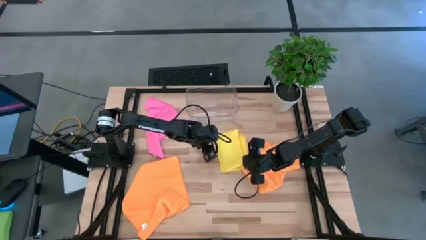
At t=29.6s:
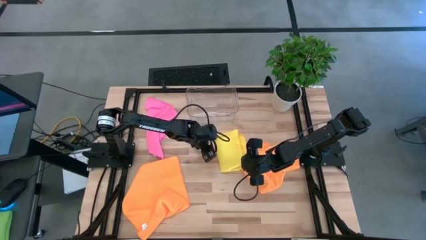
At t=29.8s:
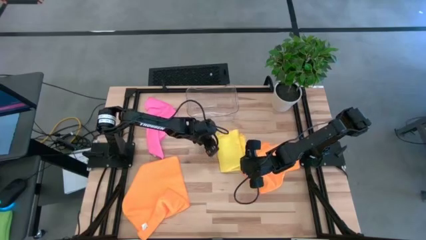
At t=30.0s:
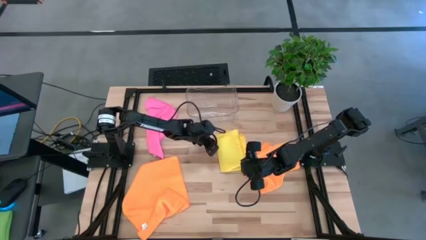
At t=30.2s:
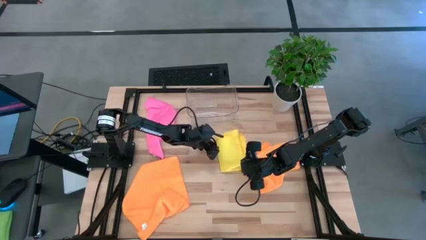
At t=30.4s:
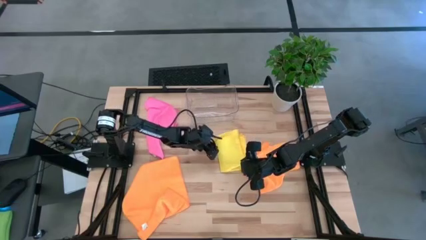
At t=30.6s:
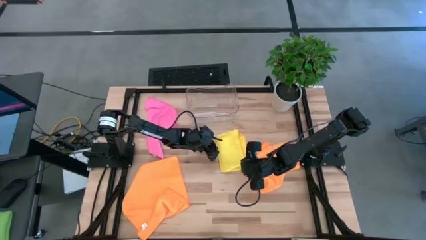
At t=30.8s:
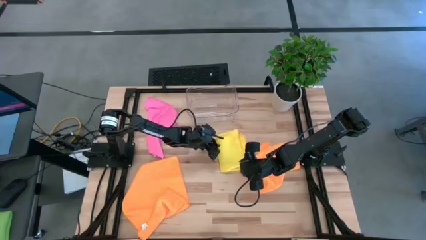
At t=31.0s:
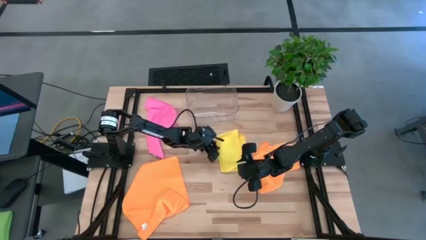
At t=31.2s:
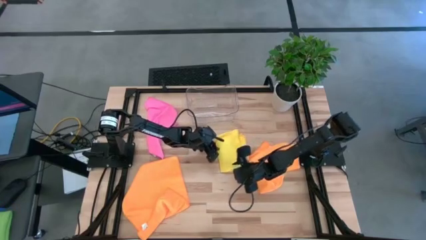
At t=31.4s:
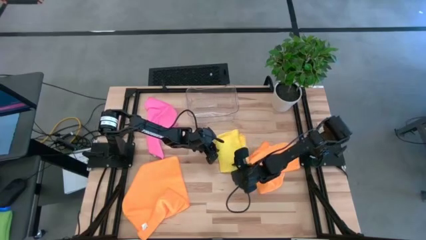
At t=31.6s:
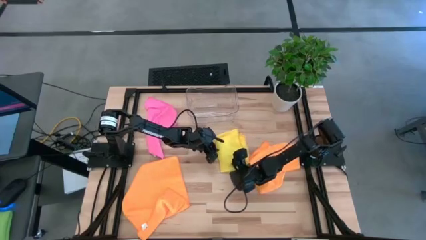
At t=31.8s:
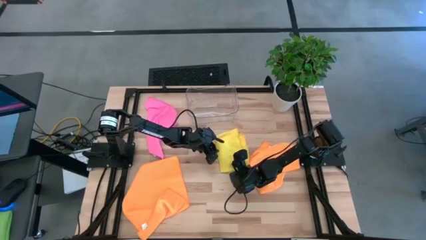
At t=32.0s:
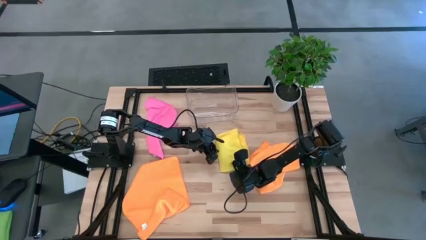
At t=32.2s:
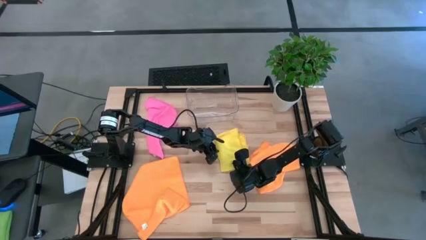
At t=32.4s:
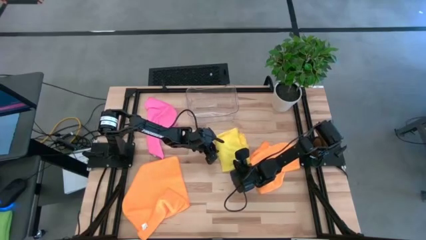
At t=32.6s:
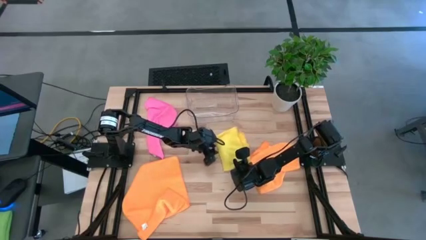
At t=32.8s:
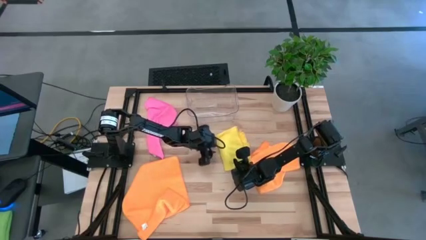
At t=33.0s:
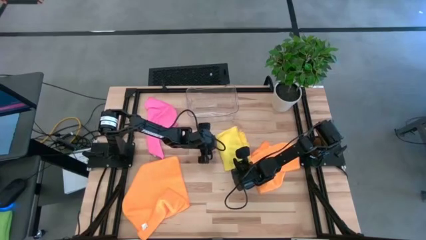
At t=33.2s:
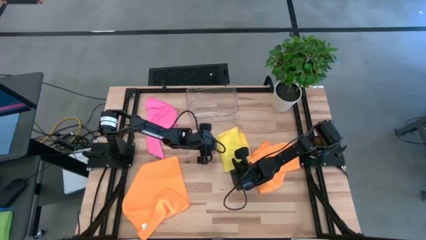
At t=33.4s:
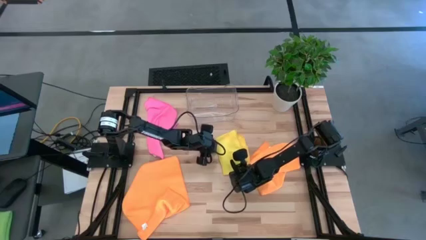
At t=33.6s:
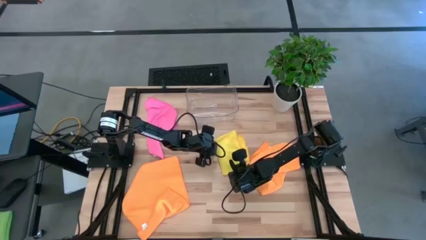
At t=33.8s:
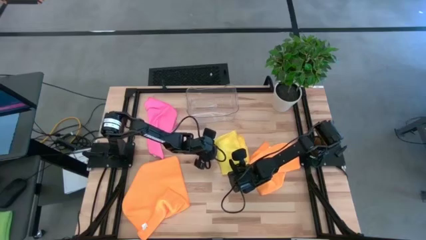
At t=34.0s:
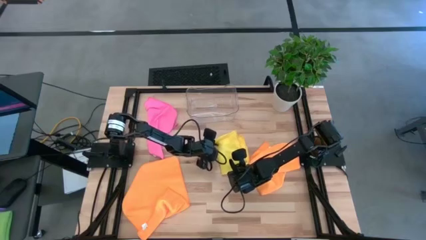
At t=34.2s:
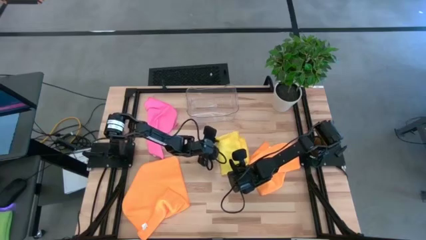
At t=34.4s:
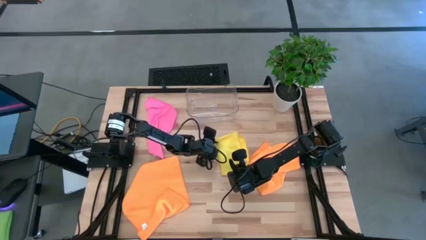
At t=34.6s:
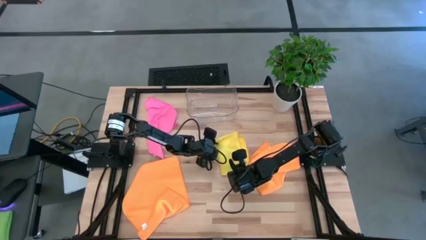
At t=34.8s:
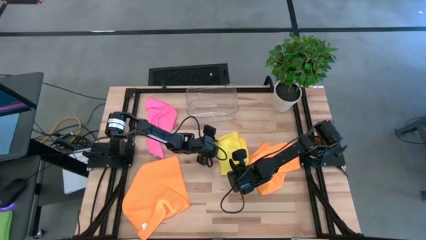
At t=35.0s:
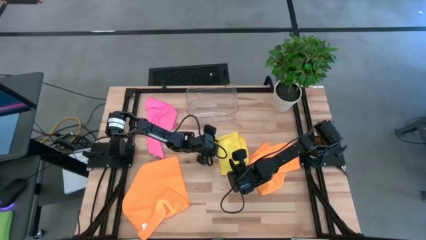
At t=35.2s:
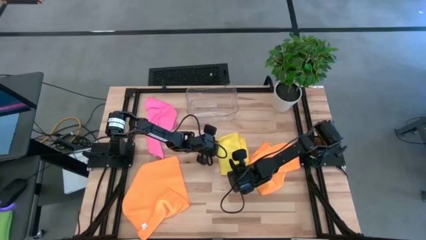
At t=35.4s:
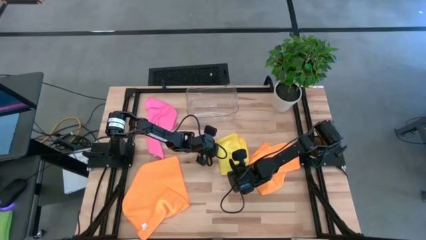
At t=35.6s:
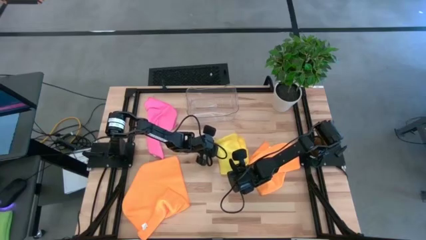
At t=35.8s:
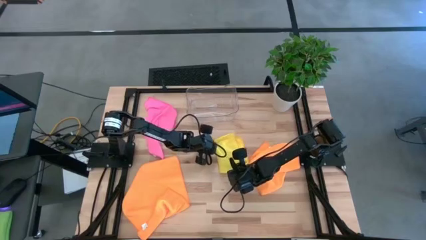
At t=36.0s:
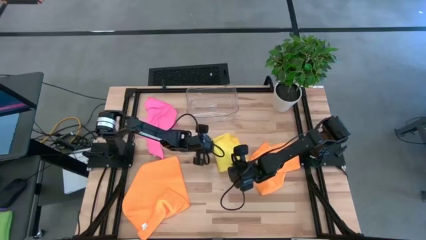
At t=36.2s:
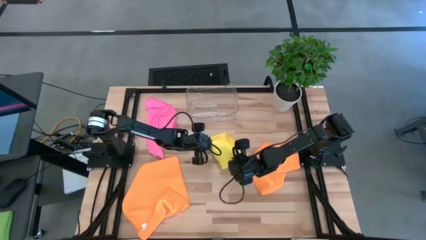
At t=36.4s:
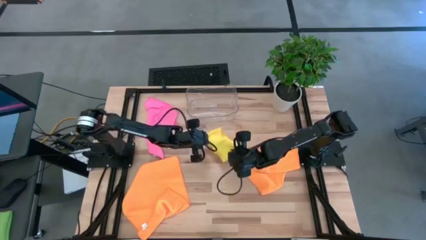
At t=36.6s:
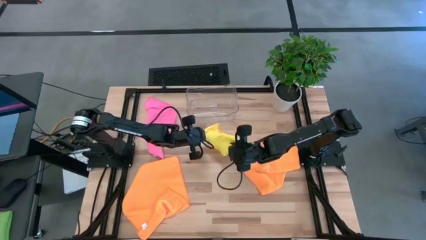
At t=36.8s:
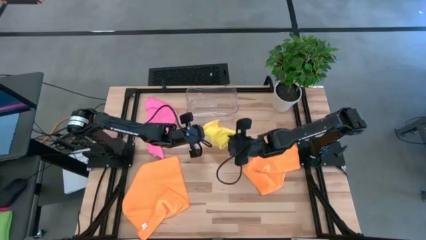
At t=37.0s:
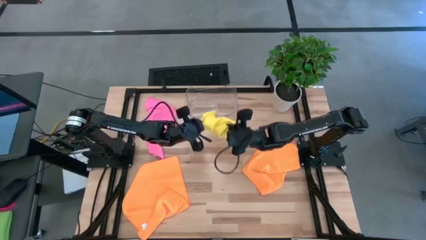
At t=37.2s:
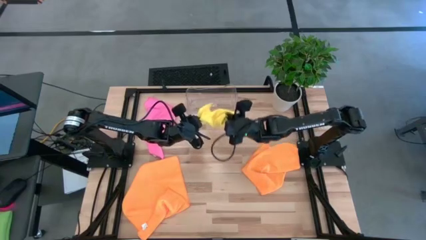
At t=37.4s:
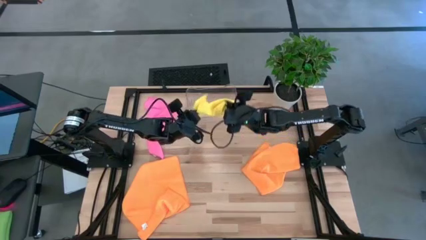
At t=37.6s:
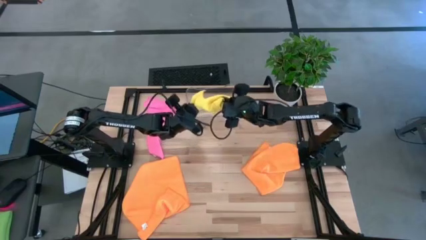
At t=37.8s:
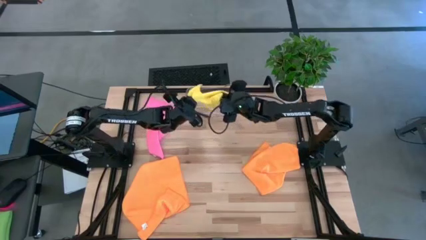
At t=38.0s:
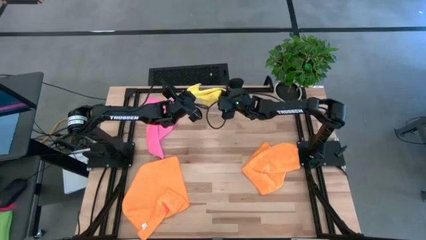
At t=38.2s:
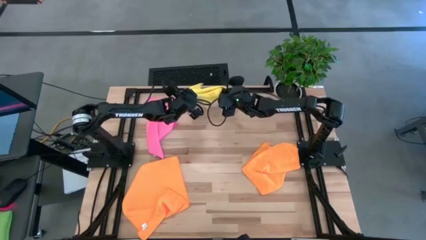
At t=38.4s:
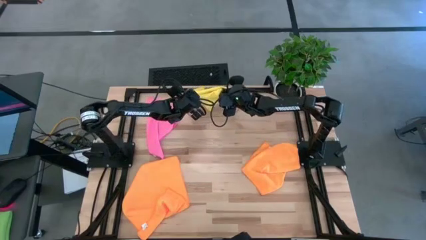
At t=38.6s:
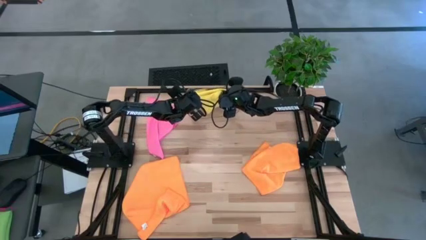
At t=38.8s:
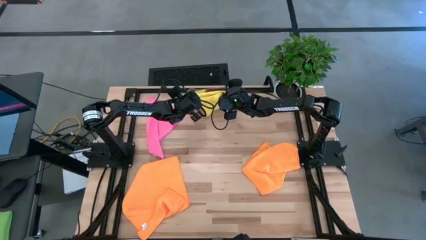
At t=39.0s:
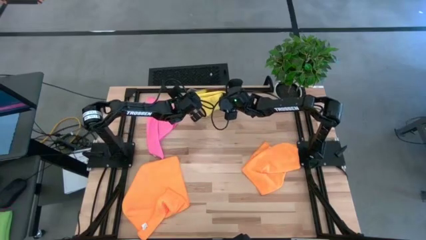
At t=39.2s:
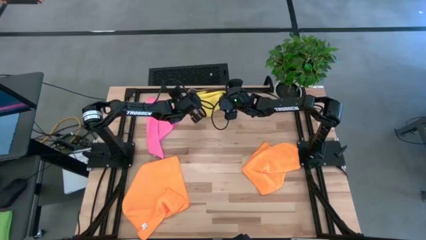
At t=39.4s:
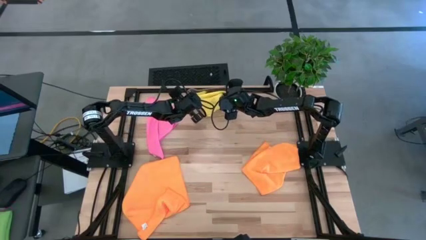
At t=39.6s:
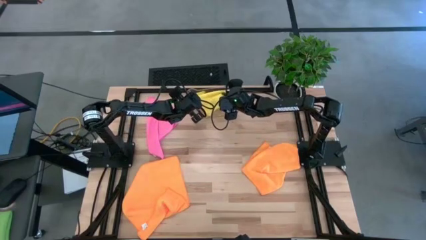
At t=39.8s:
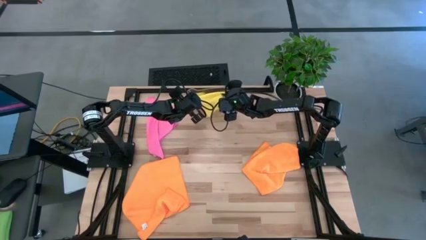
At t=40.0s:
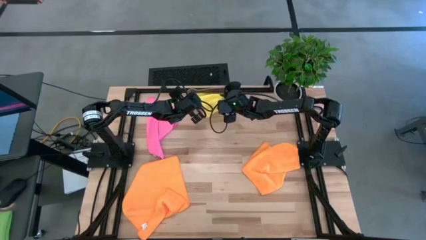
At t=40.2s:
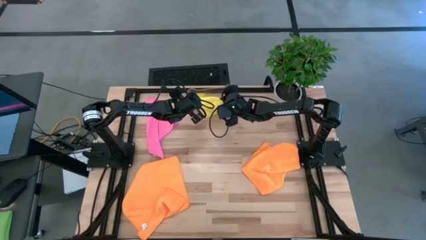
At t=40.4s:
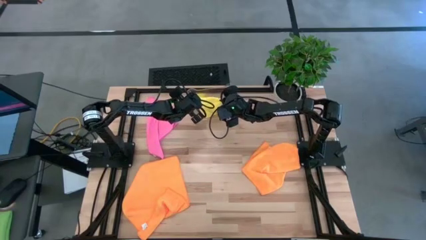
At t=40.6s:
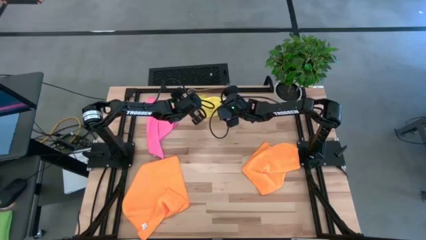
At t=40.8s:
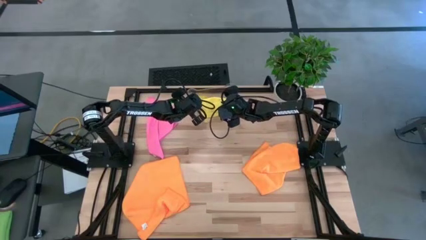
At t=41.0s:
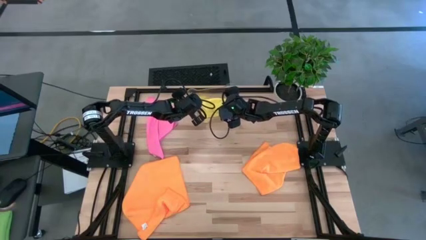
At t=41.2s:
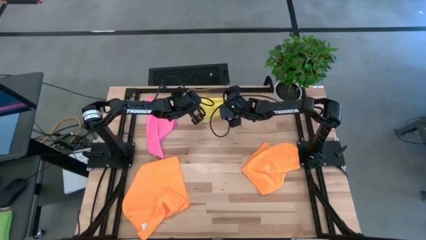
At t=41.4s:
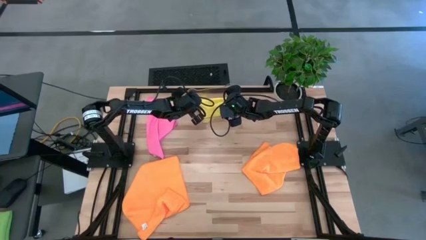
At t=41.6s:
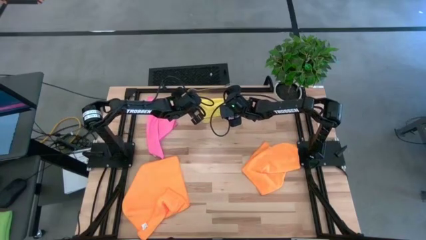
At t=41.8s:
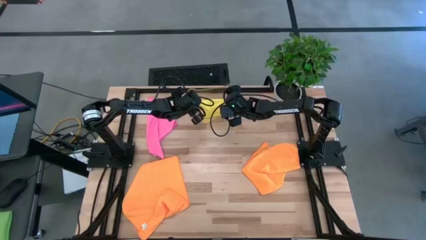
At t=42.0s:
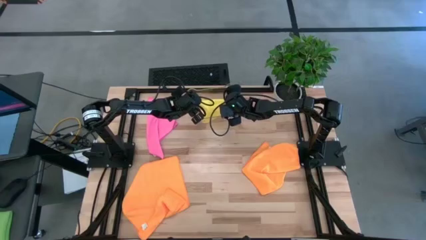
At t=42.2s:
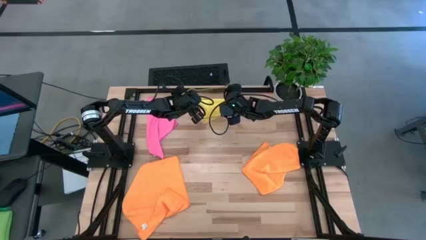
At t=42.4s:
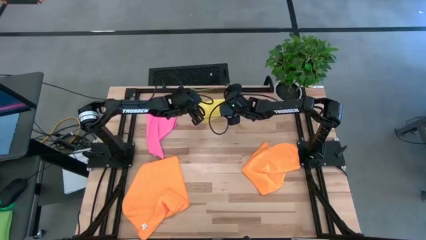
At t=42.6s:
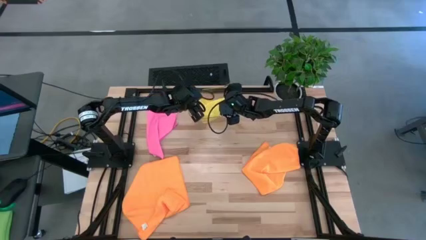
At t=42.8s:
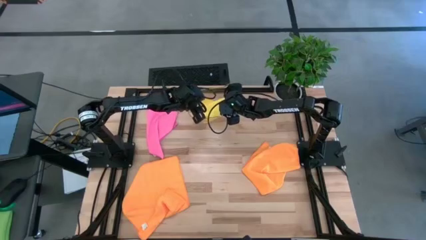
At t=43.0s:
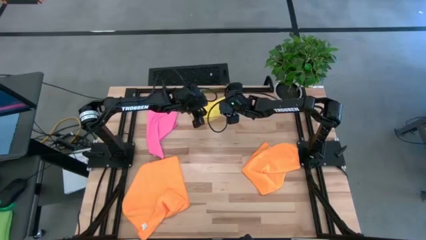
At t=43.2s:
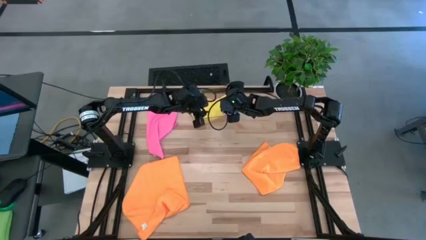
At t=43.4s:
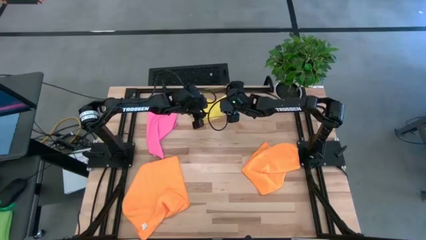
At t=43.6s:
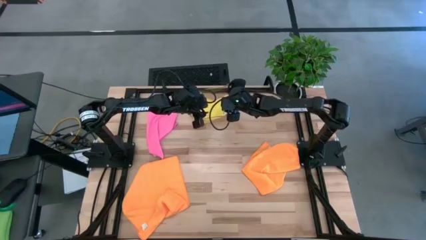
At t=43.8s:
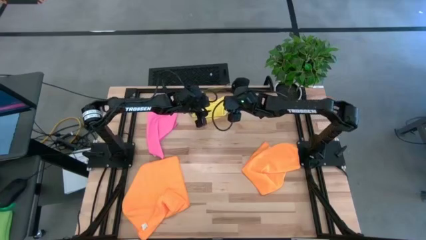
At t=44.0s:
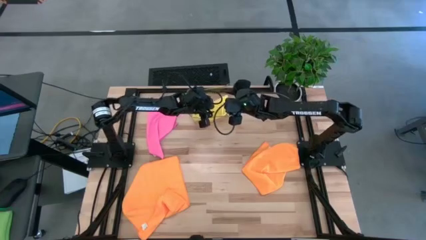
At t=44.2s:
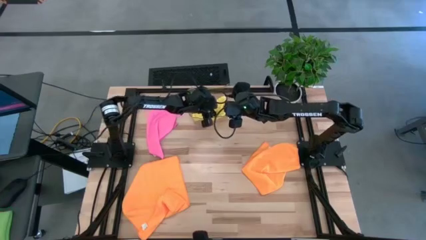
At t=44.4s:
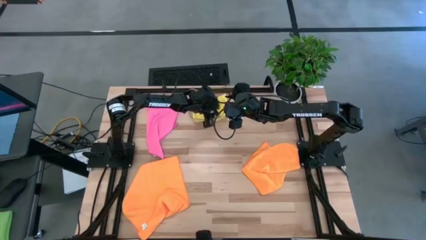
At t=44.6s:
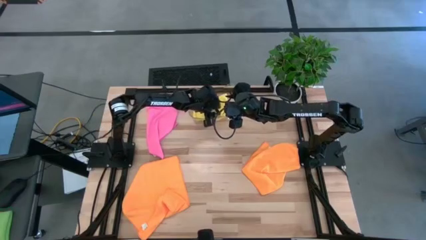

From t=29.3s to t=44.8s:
Task: Fold microfiber towels
Put the folded yellow towel into the transparent bin

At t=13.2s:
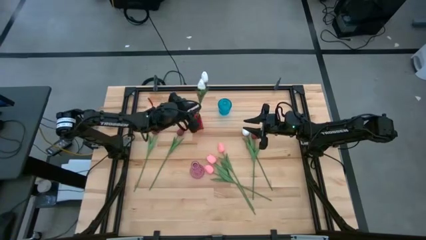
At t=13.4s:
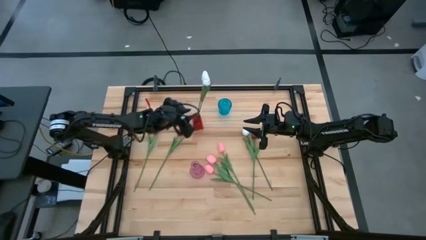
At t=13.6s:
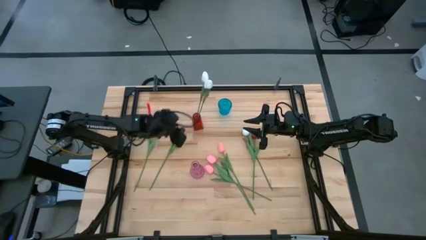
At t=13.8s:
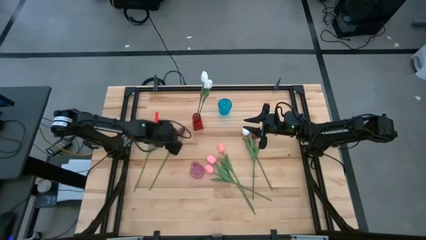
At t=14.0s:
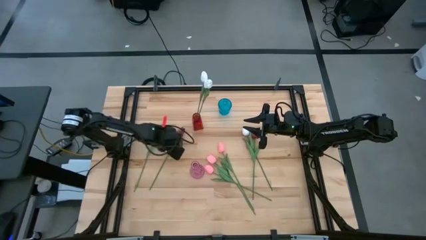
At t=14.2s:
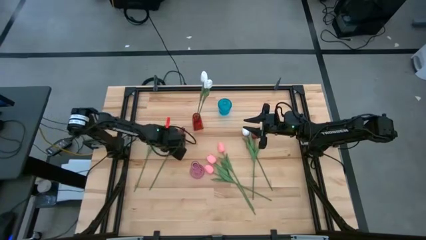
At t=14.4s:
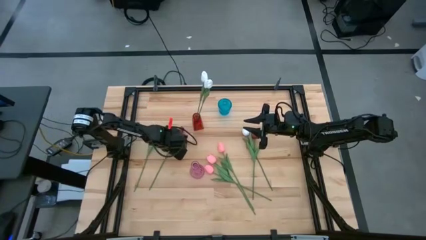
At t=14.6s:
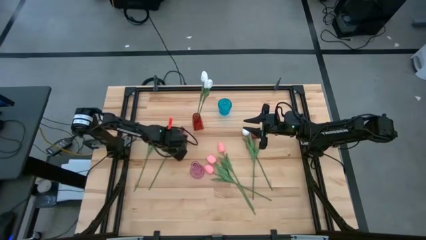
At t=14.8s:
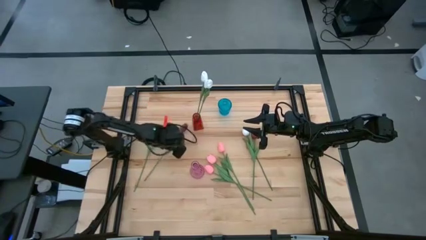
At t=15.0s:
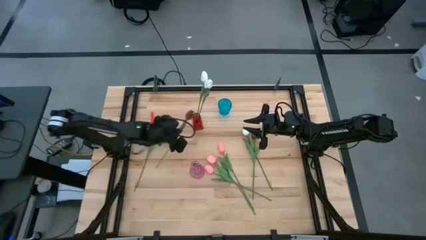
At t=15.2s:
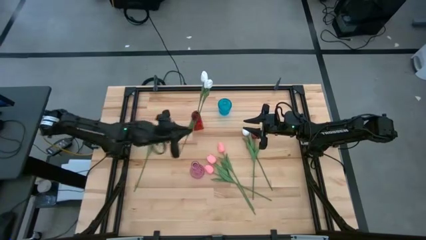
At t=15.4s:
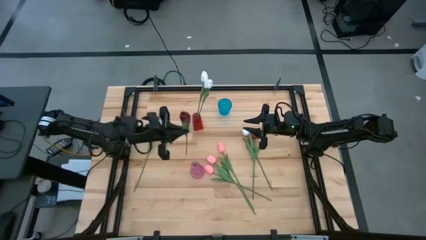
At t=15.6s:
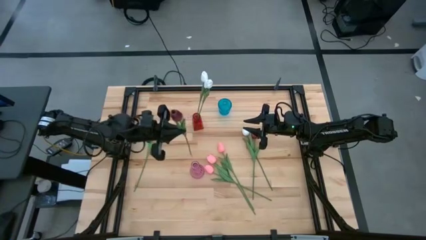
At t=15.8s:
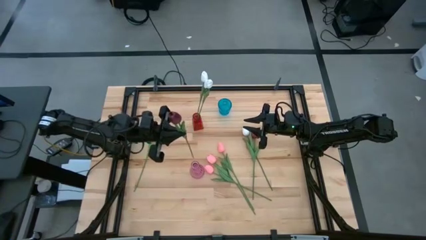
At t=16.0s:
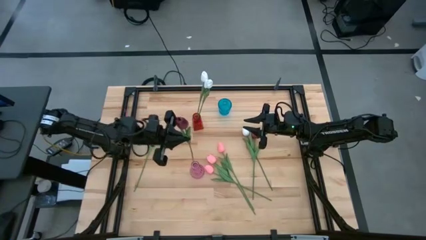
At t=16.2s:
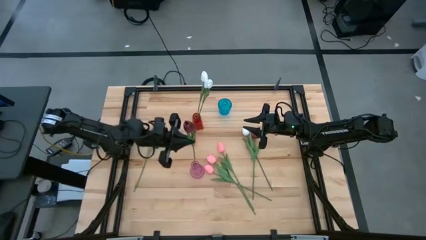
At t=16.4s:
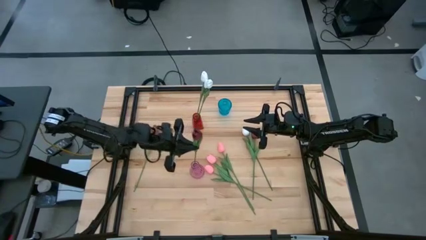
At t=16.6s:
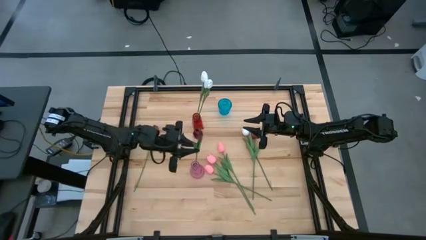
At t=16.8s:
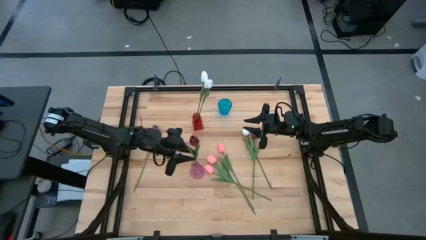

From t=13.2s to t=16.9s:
Task: Sort flowers into vase by color
Put the middle red tulip into the pink flower vase
